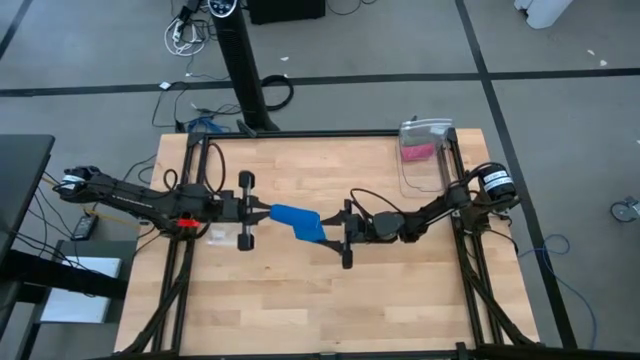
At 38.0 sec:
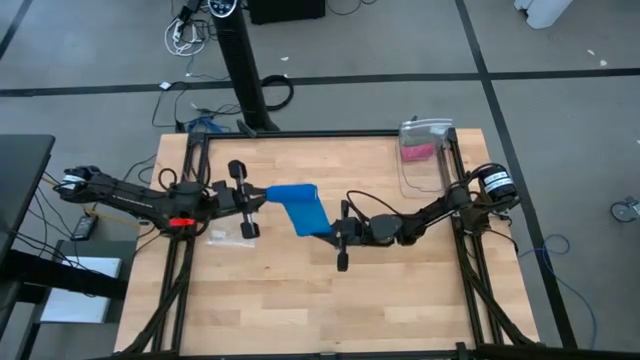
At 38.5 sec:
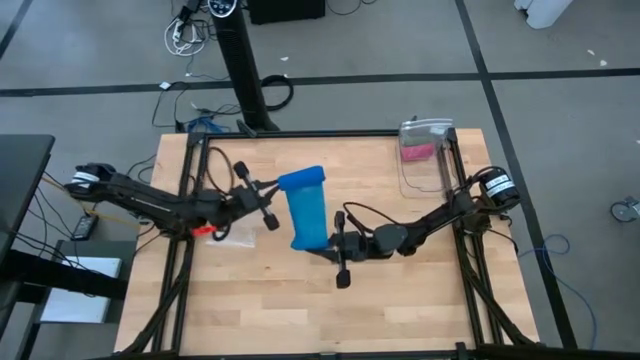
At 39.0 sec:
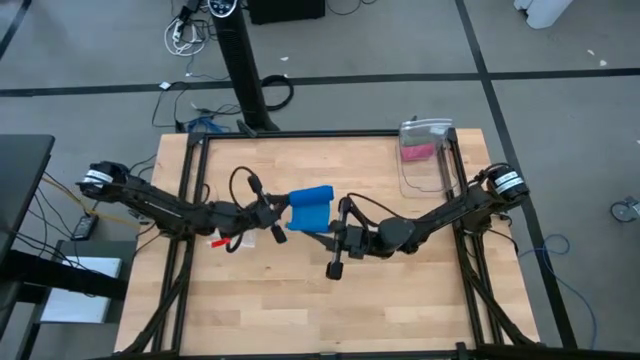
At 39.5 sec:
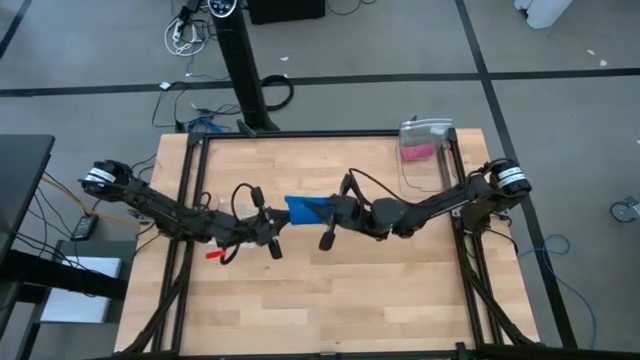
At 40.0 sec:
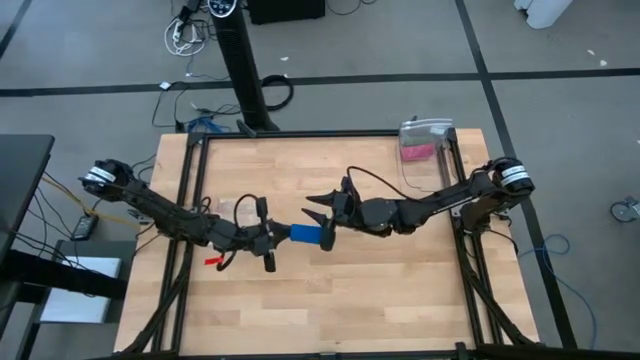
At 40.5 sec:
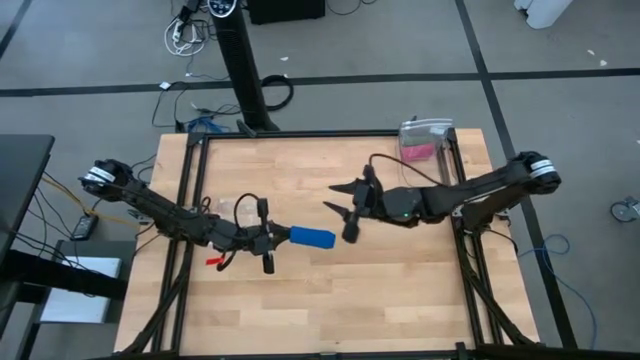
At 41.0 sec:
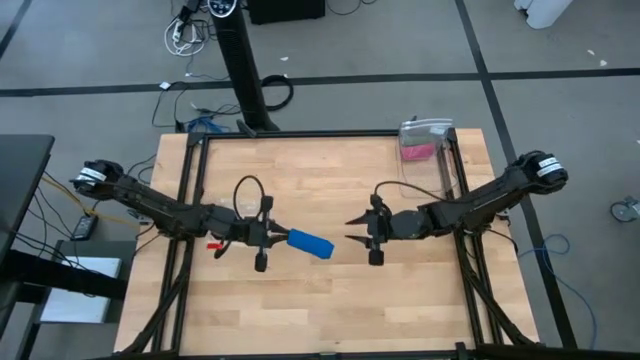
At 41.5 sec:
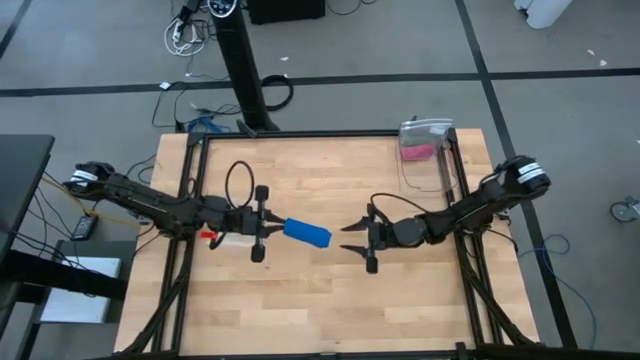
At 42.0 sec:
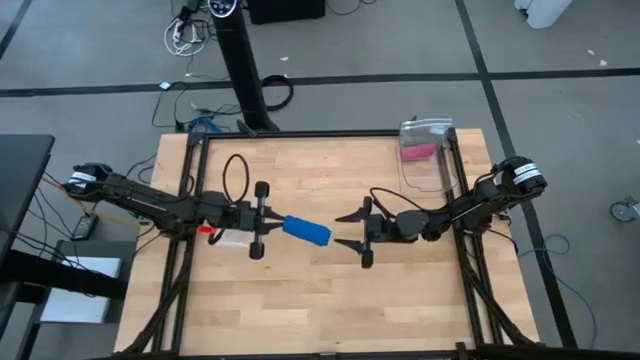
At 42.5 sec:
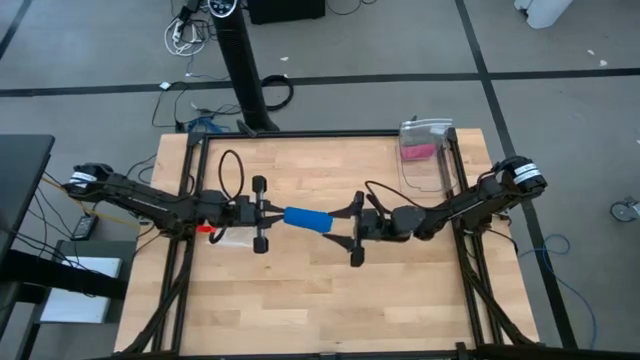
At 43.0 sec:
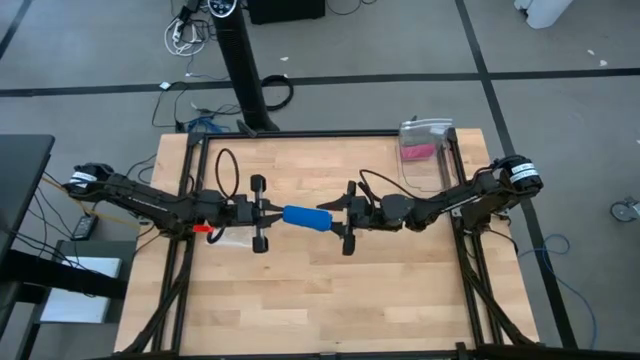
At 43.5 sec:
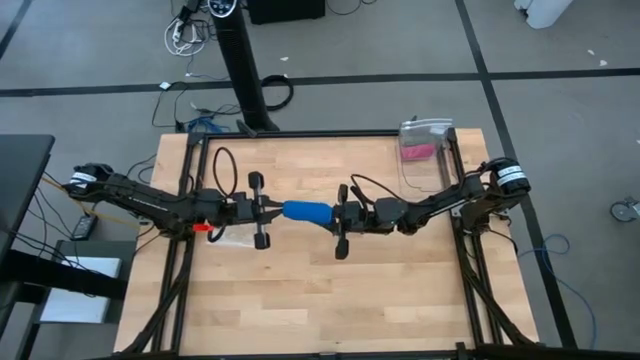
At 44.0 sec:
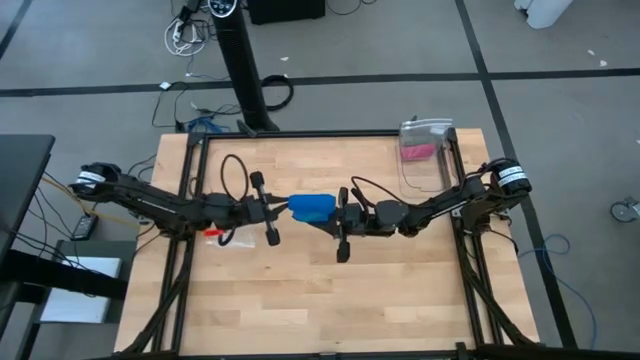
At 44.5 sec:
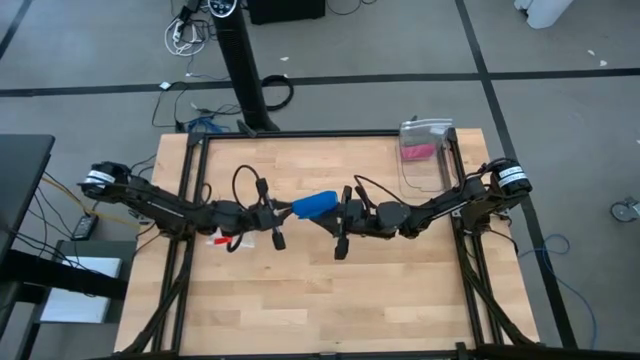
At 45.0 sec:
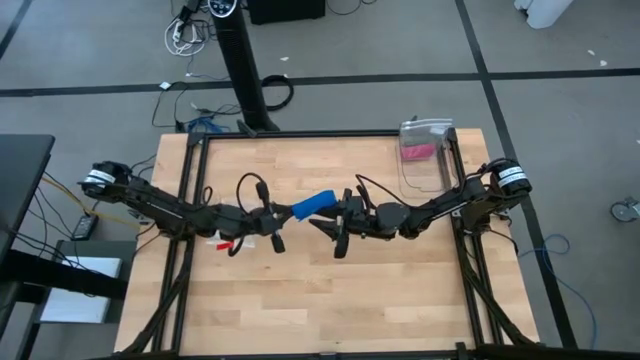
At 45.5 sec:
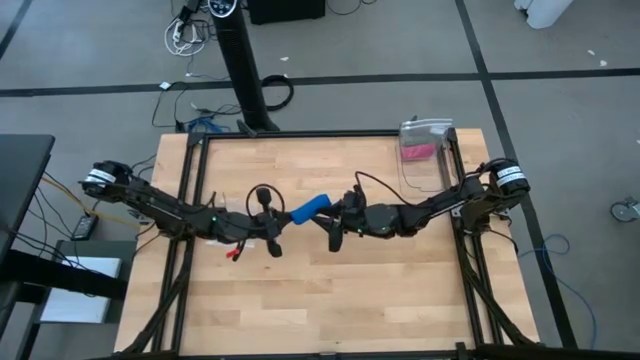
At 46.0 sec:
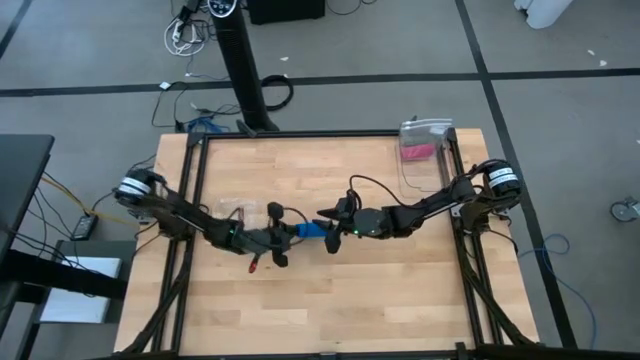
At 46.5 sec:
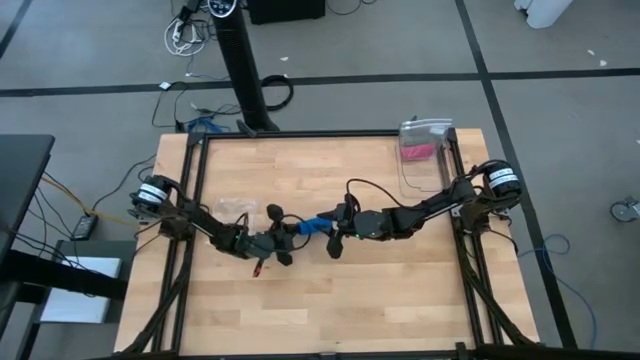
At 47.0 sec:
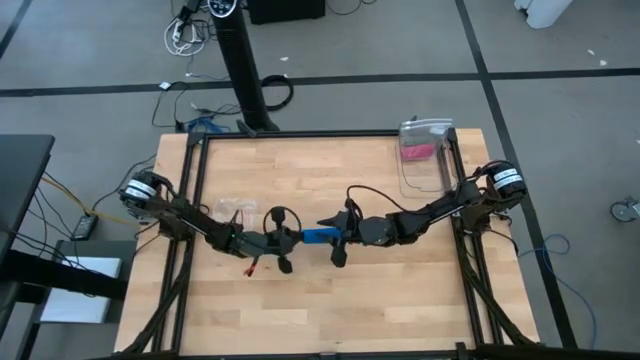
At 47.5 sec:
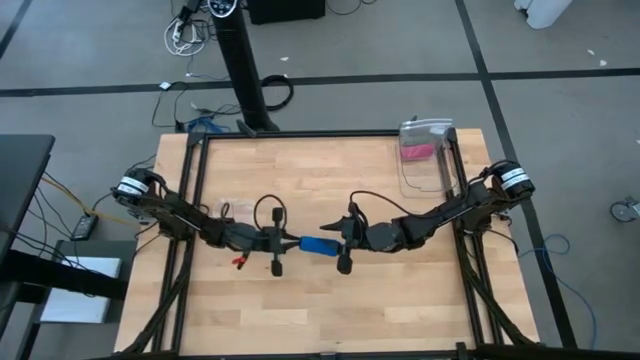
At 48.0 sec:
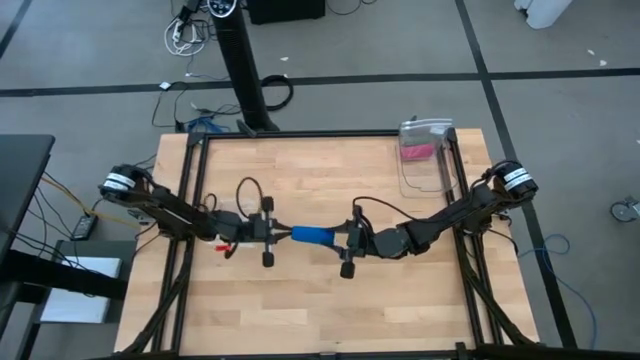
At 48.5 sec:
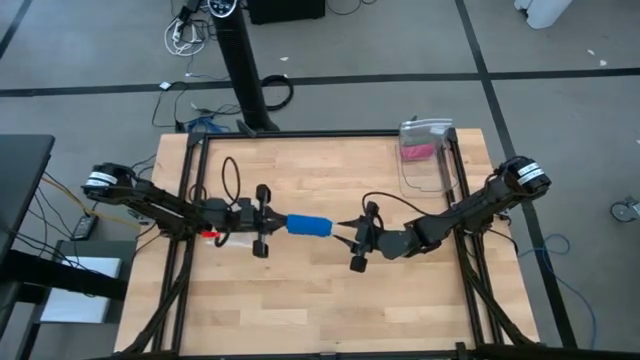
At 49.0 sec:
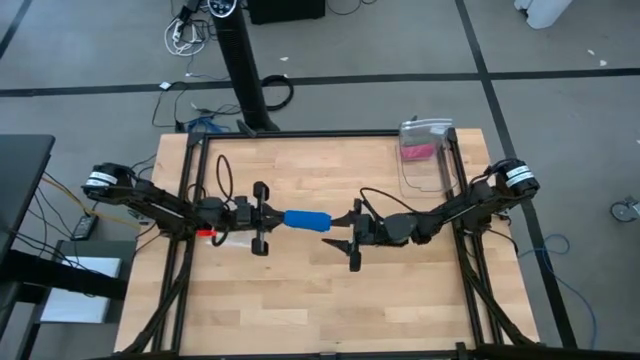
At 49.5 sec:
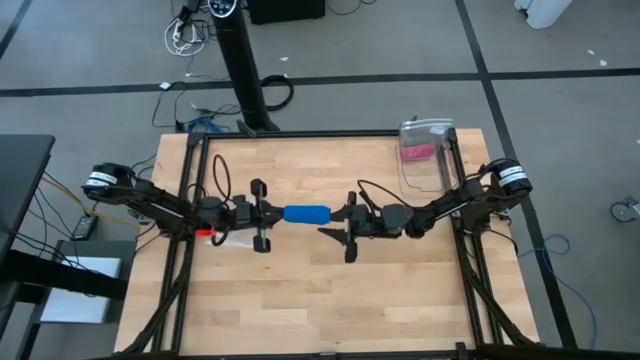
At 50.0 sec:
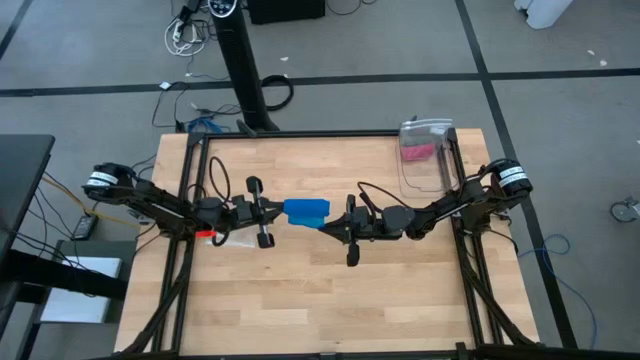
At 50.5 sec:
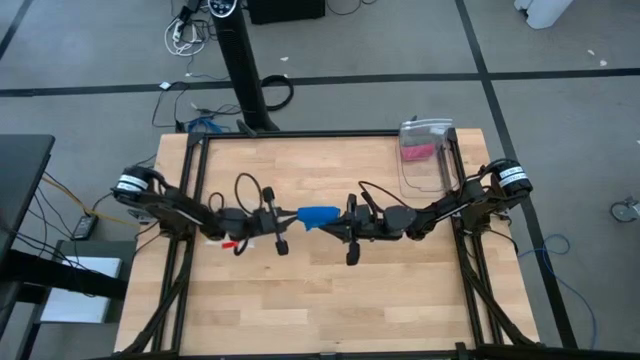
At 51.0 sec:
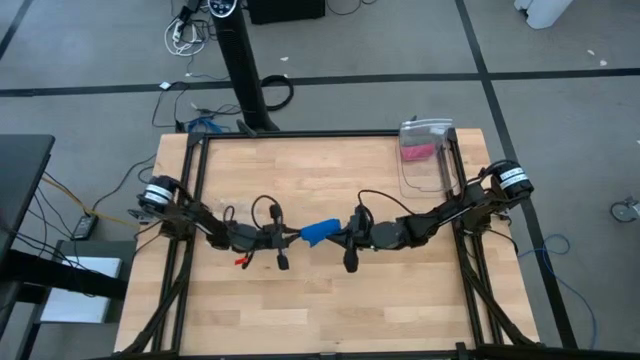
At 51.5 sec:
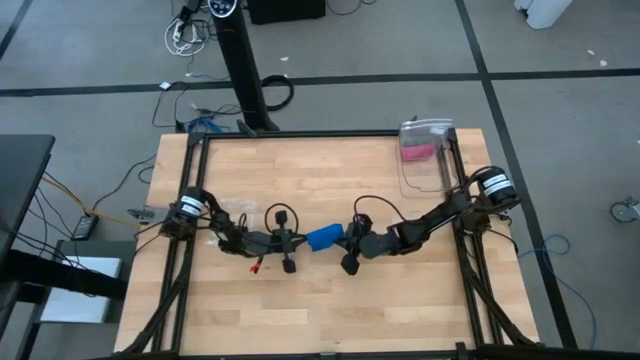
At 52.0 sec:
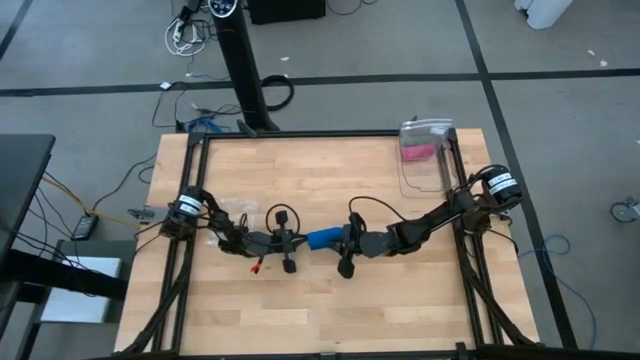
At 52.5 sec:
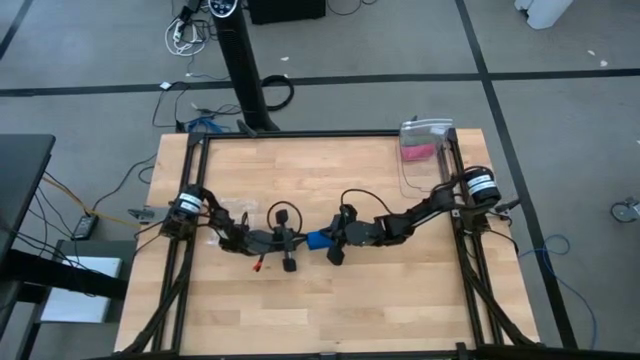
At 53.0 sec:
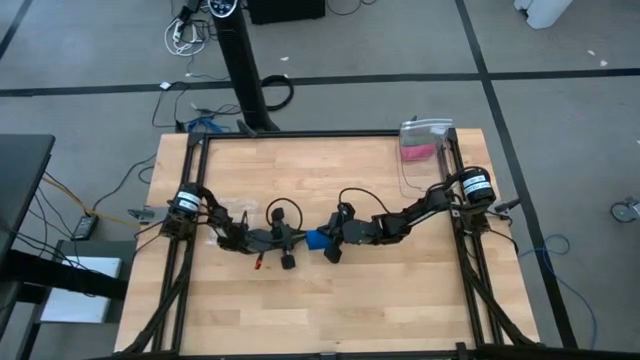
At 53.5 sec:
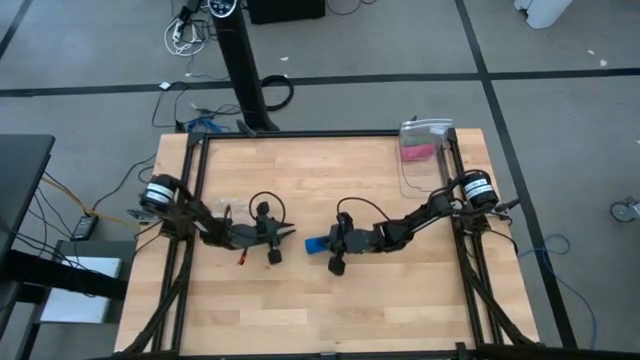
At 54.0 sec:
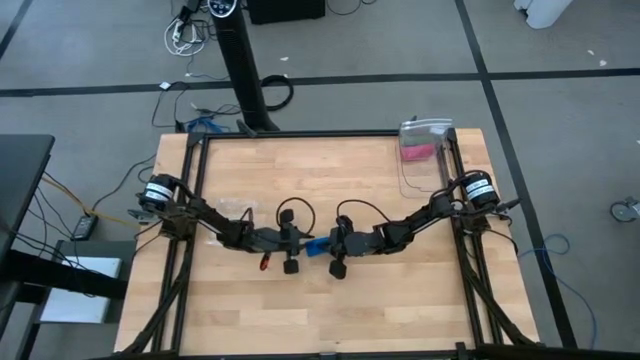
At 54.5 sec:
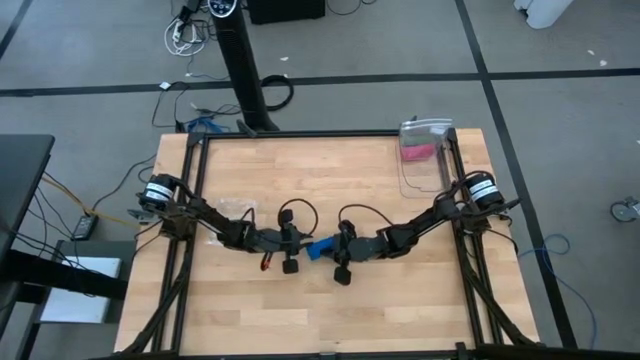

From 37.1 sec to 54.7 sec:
Task: Roll bandage
Roll the blue bandage

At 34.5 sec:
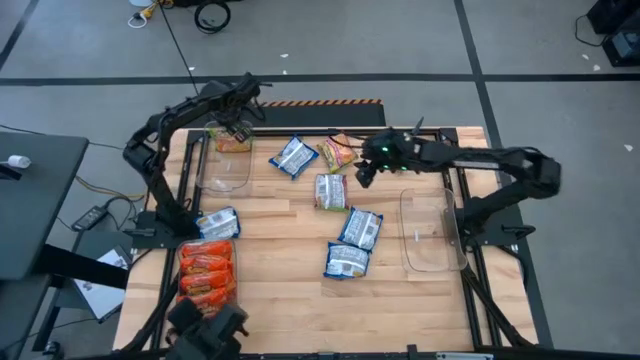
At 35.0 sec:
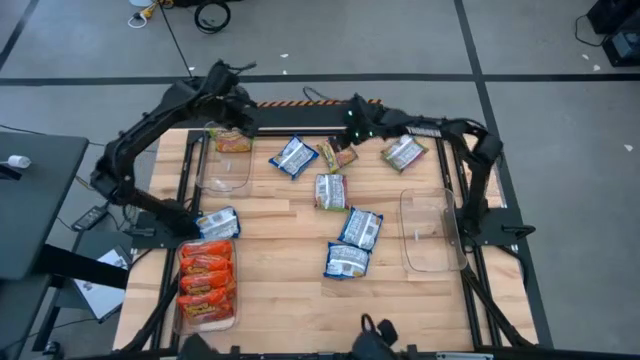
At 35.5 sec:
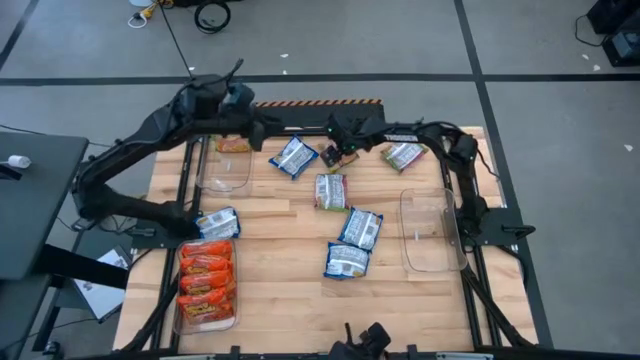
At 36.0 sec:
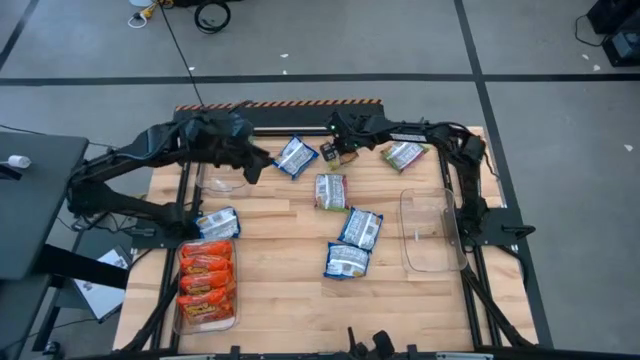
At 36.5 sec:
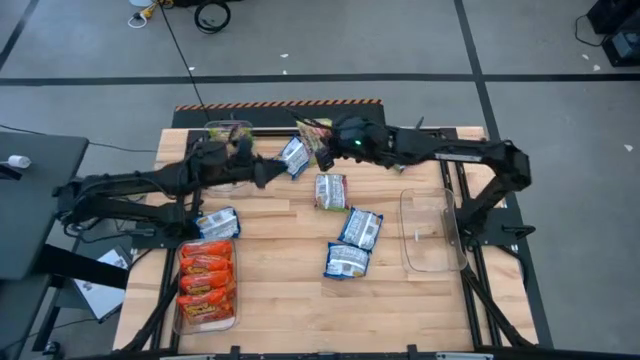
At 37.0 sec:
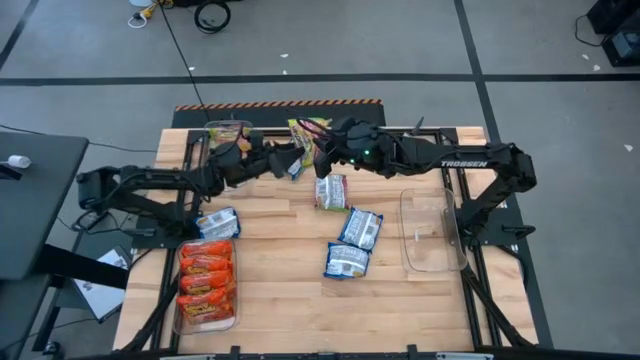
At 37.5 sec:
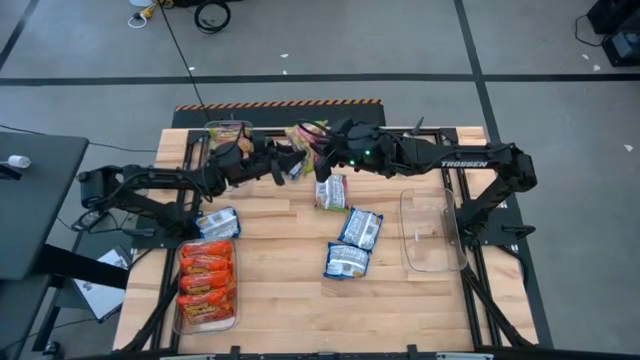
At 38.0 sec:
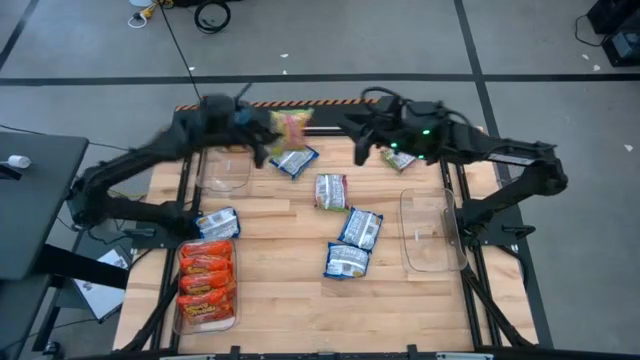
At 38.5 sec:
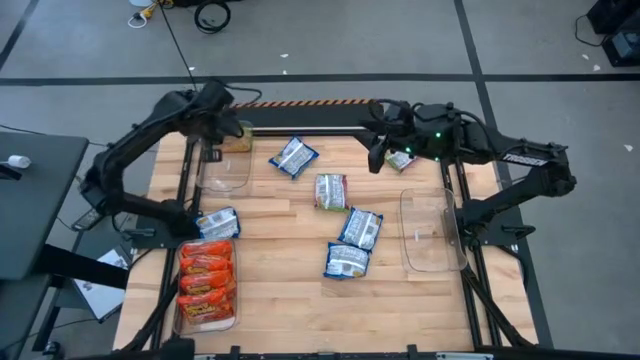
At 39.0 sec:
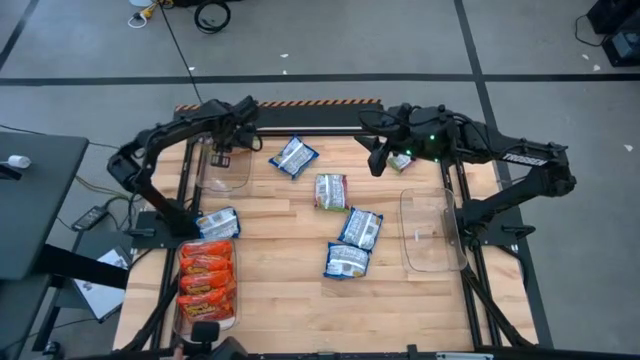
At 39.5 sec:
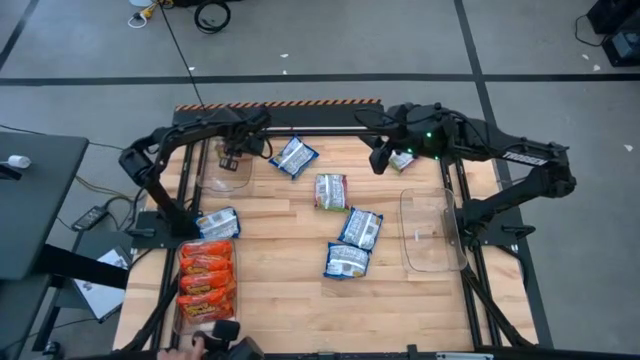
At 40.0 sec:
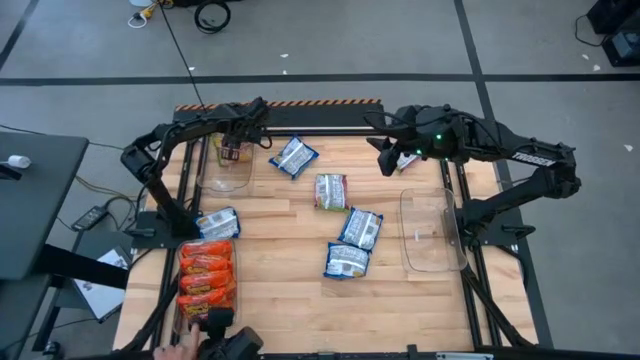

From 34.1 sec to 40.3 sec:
Task: Sort Maruchan noodles
Put the top left green noodle pack into the top left transparent bin
